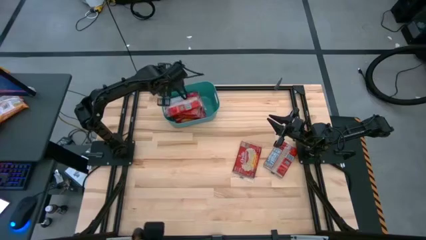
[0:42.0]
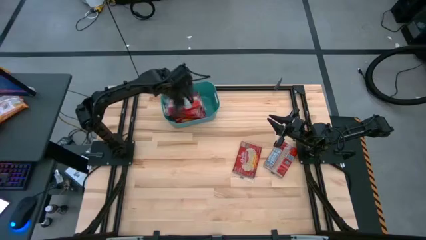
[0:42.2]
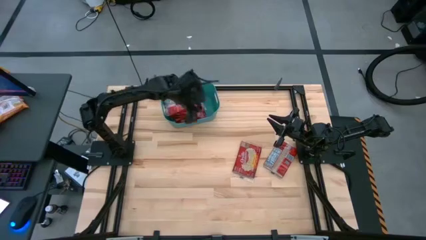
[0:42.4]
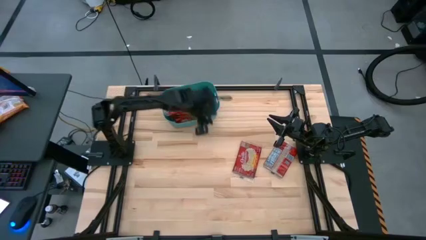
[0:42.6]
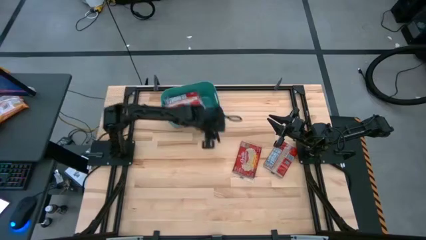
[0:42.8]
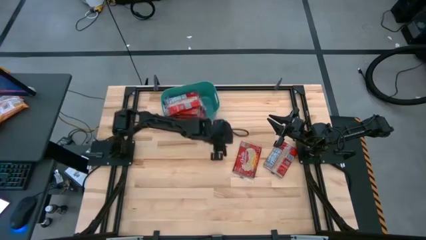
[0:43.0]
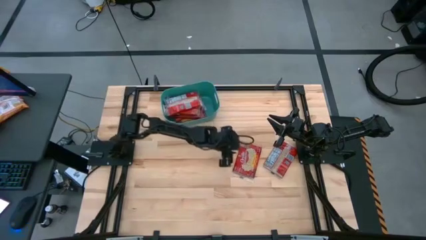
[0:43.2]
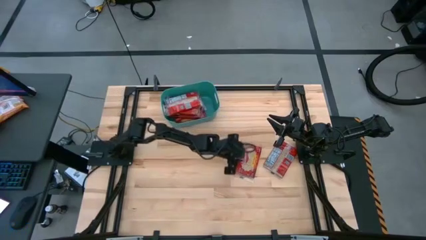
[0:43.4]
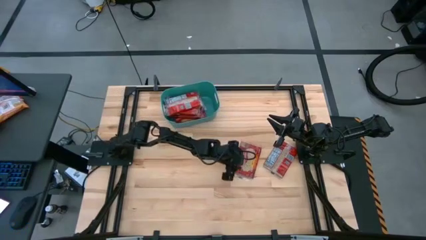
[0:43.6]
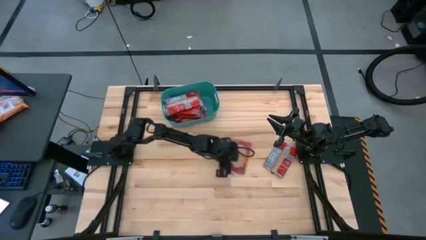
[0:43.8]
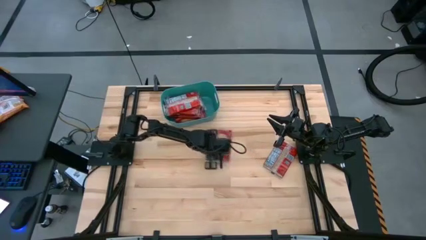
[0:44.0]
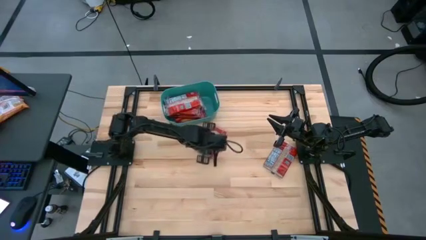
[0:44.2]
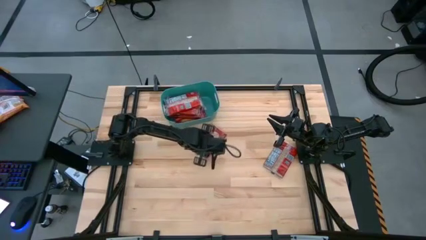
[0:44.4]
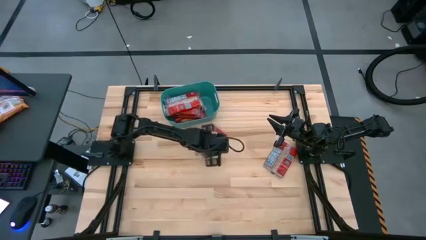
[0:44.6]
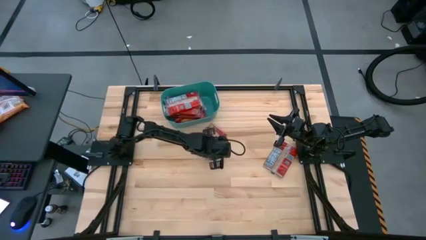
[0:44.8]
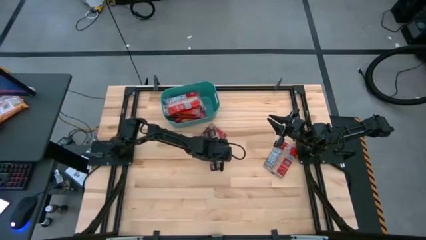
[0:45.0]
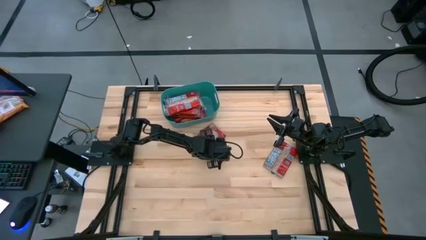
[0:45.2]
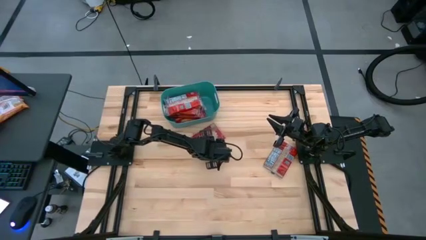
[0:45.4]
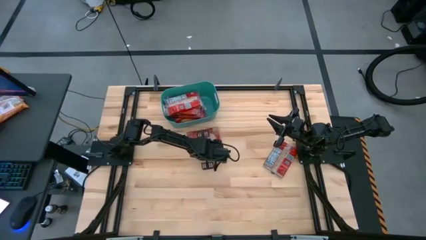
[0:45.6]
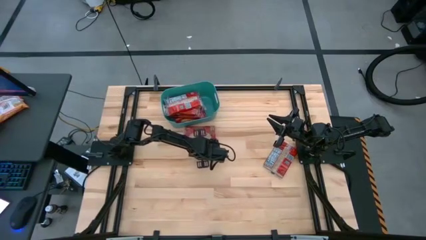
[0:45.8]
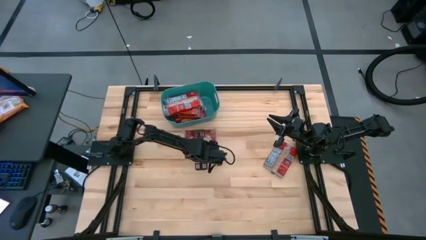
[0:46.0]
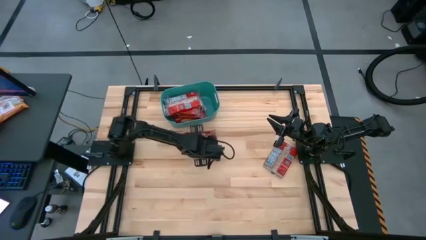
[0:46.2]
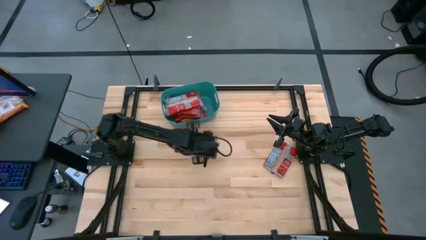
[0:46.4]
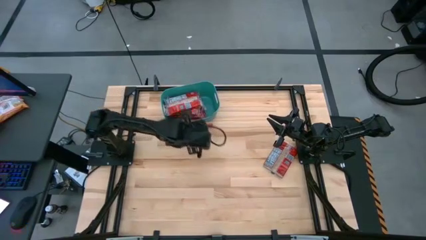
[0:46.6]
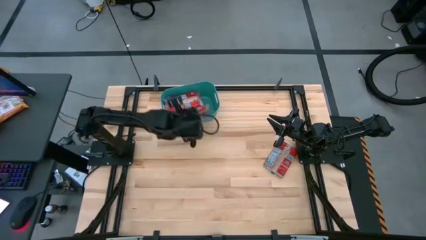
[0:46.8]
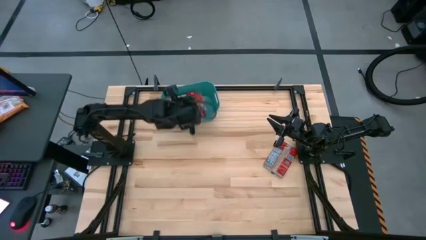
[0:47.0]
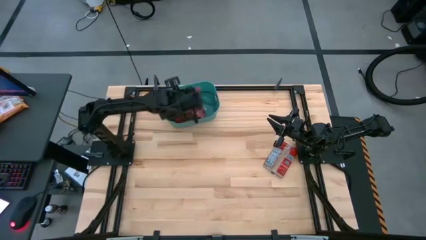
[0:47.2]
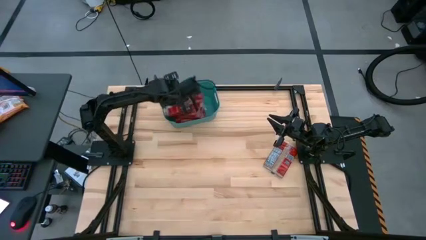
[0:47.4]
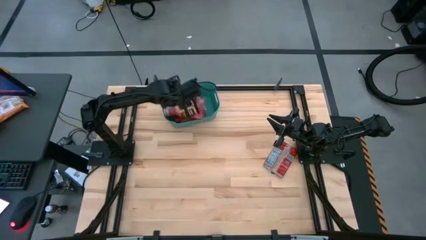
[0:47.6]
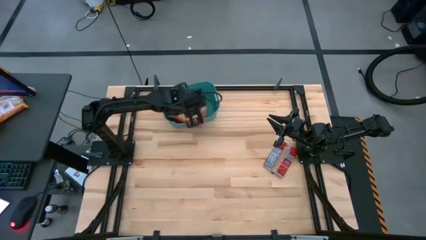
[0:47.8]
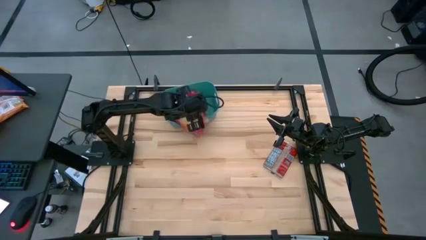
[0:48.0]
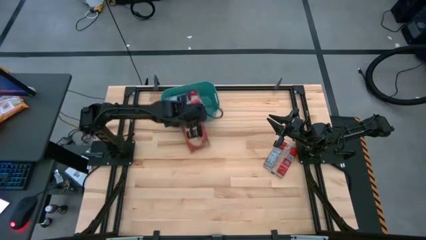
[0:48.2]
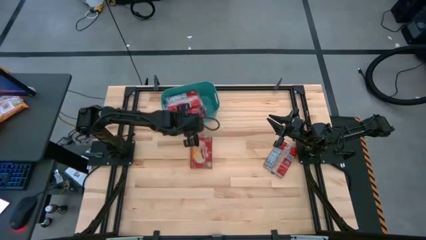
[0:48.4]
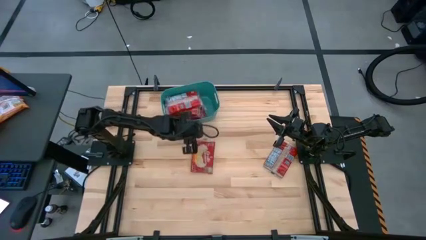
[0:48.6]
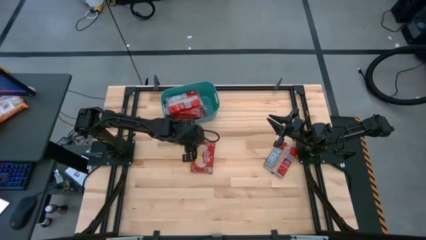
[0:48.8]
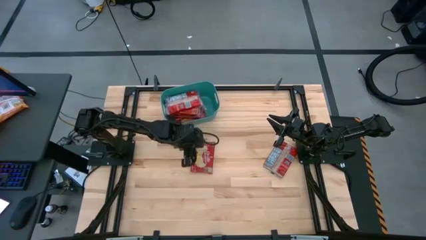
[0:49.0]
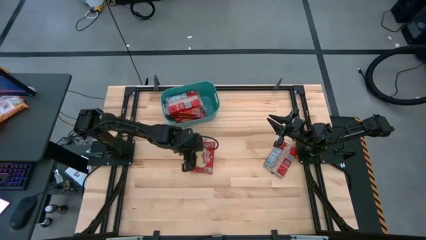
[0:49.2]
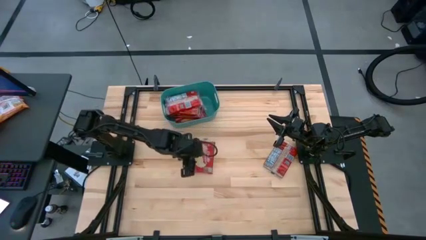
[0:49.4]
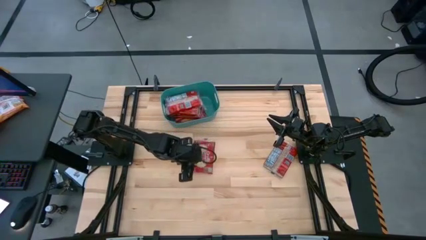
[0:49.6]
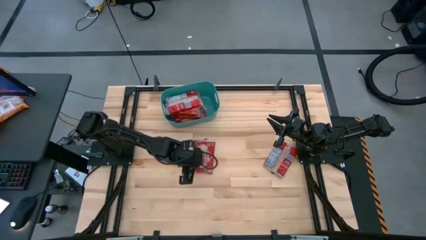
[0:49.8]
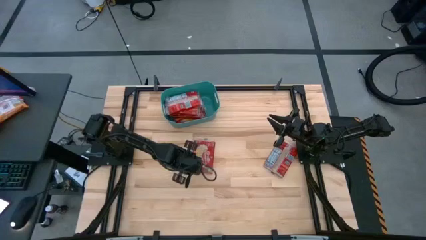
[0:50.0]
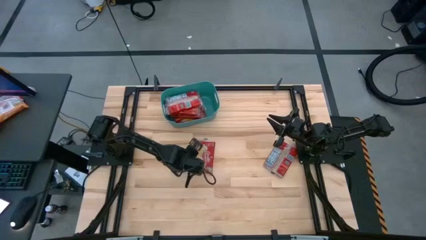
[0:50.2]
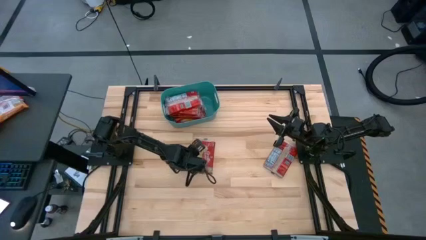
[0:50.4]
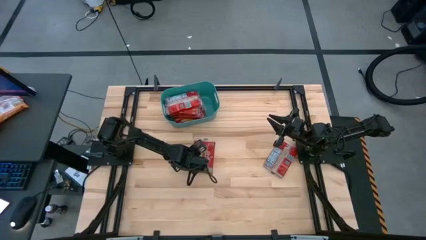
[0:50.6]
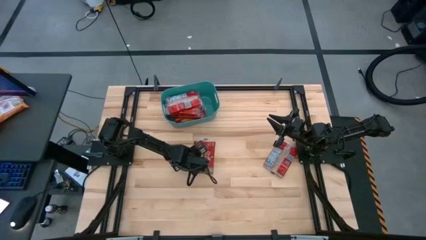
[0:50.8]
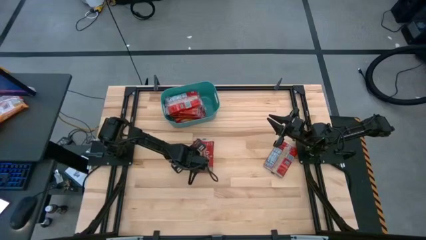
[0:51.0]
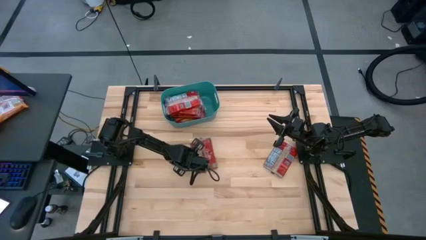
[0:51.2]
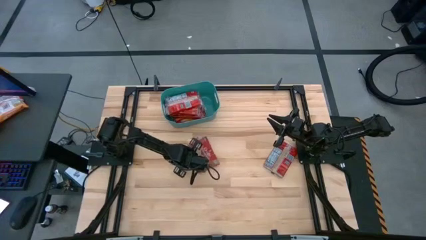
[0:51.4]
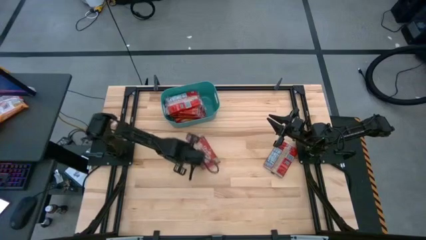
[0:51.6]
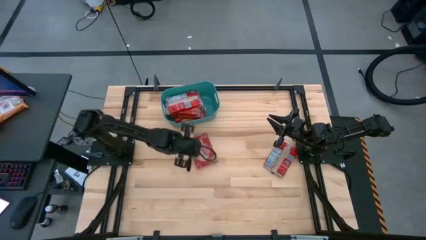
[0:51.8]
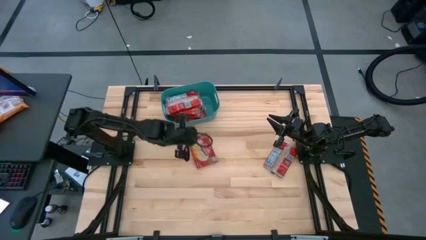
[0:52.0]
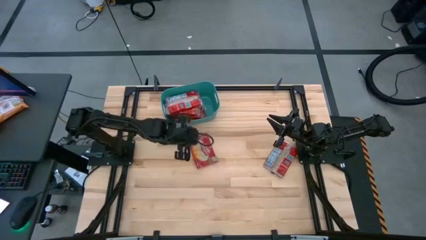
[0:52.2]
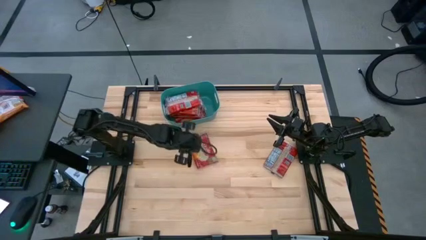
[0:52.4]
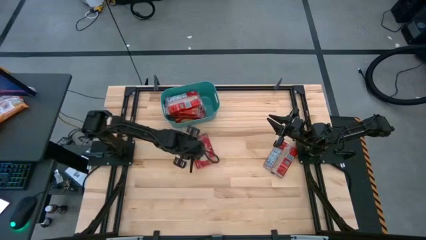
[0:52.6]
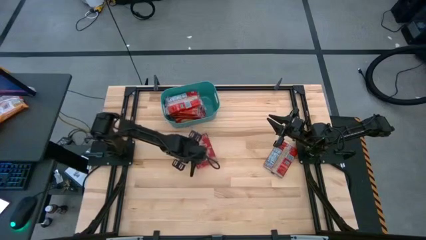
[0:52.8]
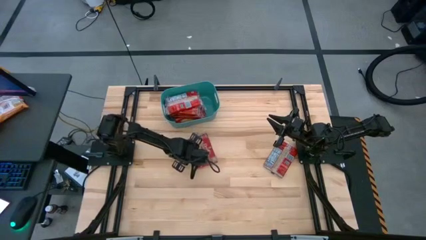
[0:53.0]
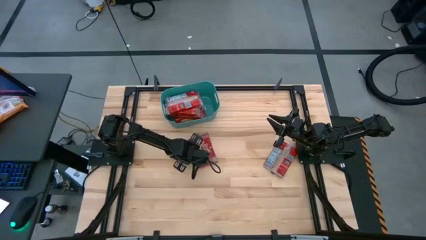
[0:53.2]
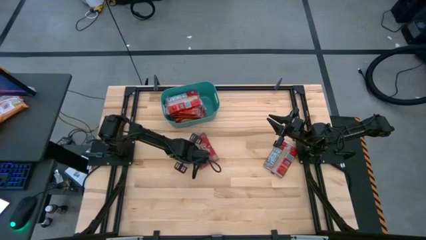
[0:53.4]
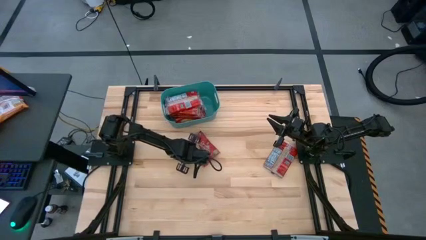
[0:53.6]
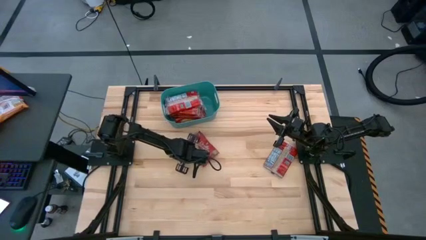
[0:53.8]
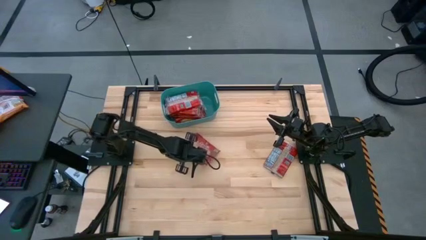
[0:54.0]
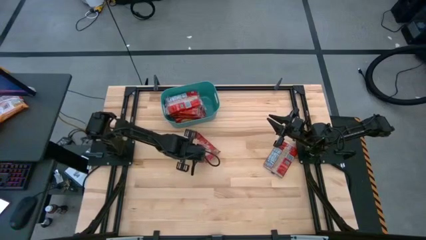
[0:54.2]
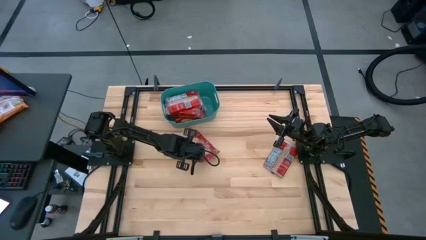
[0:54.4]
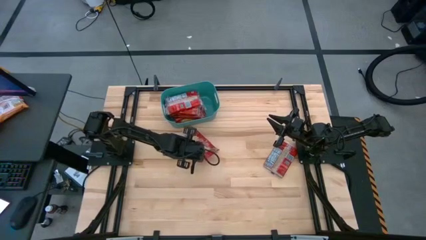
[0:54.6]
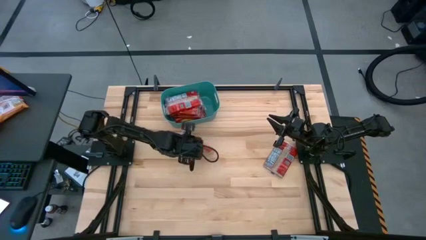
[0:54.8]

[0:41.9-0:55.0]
Task: Sort popcorn bags into baskets
Stack the popcorn bag into the green bin

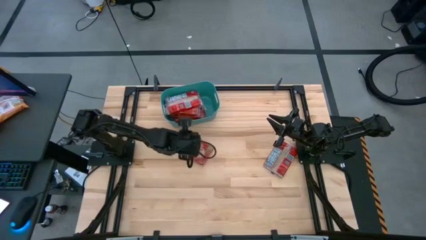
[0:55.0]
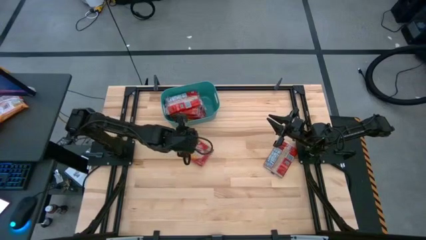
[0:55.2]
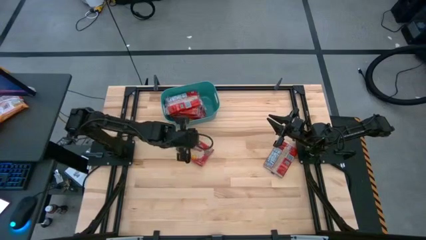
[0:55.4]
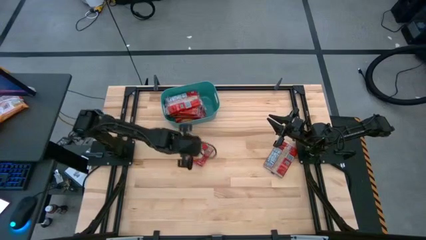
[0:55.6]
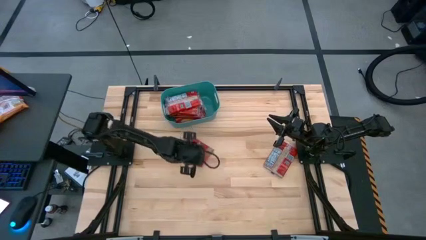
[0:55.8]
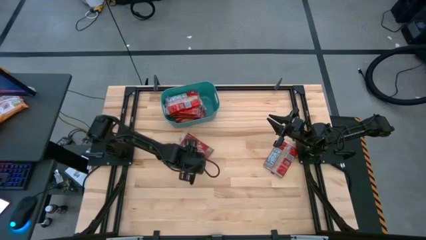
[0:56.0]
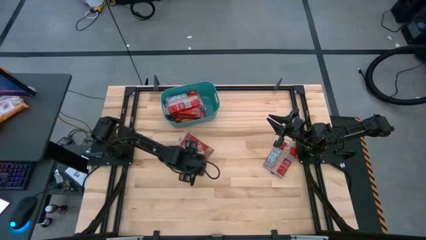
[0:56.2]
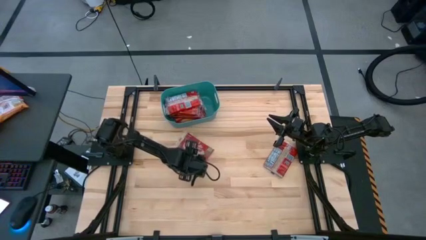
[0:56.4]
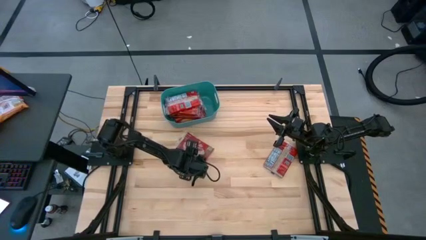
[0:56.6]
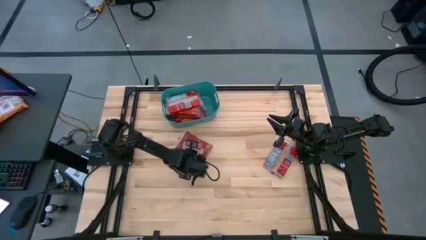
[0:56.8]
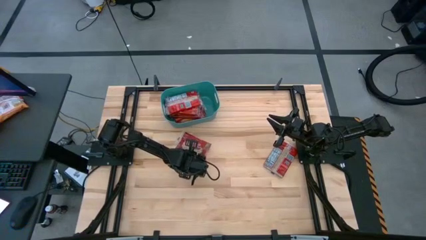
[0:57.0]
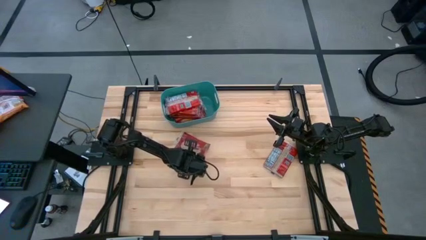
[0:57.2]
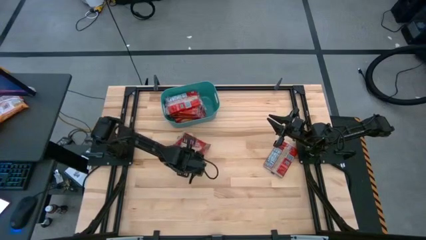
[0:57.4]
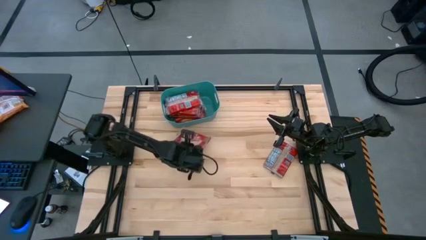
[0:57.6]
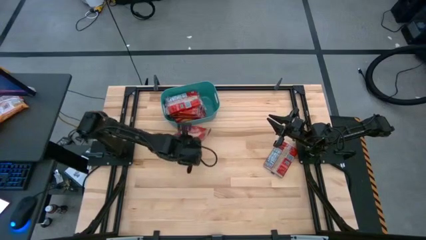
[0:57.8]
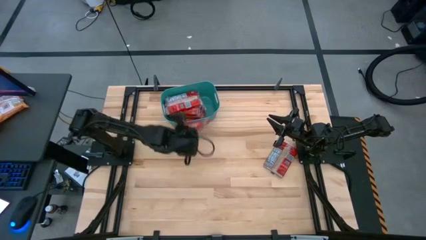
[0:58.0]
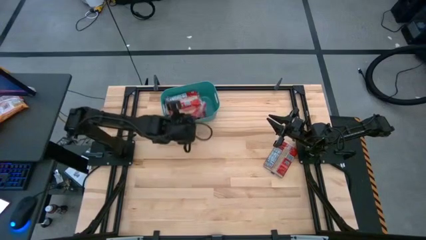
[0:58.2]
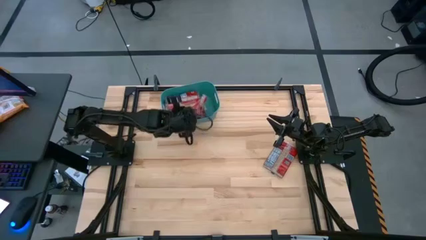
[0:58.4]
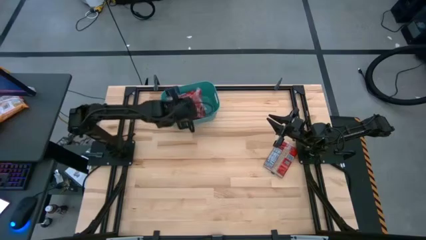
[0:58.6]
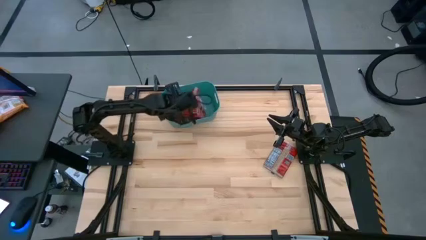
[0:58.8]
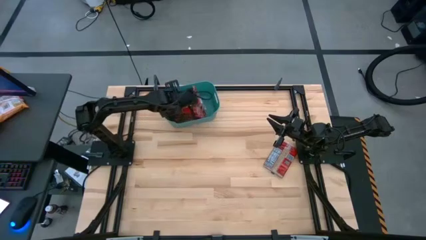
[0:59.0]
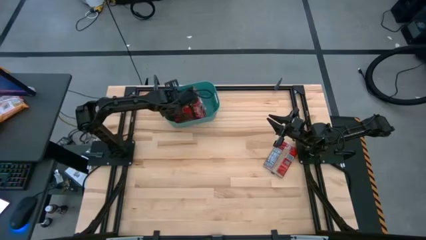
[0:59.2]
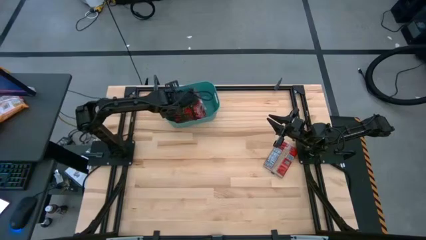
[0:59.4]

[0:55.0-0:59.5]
Stack the popcorn bag into the green bin
